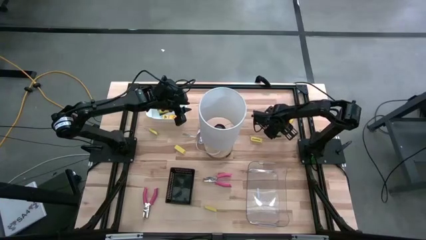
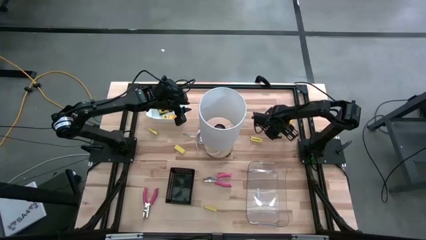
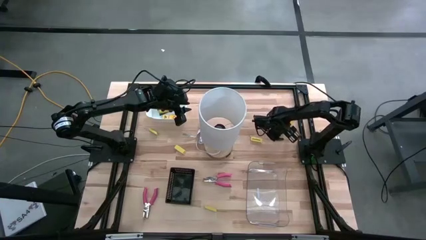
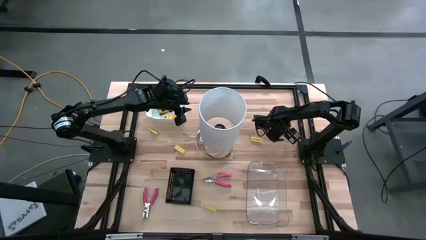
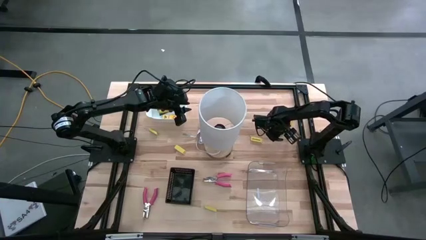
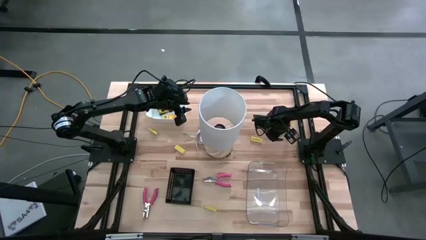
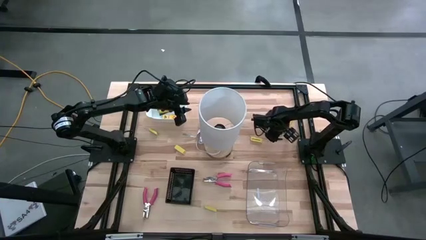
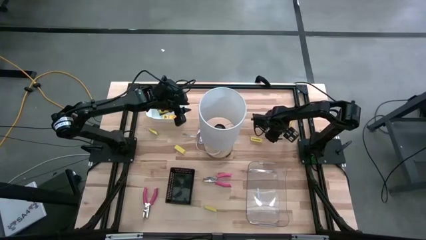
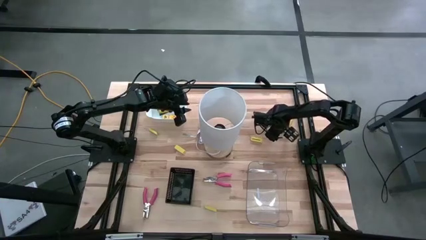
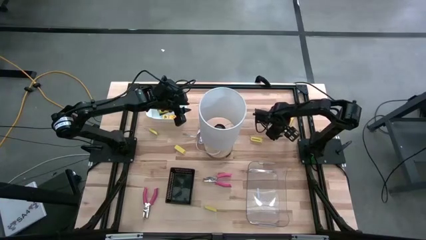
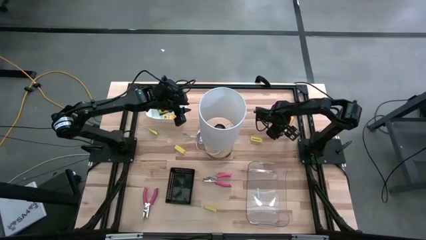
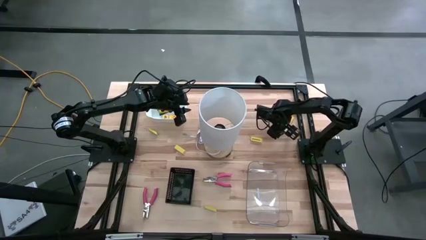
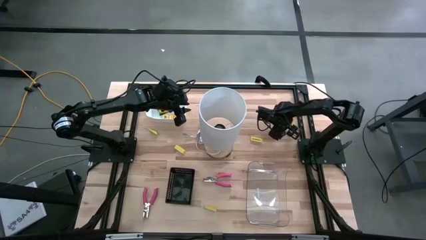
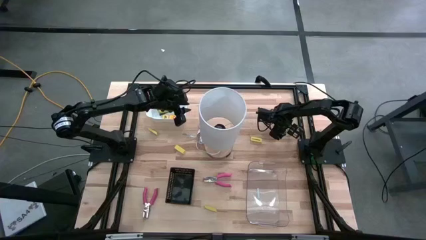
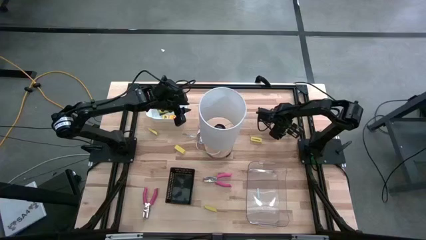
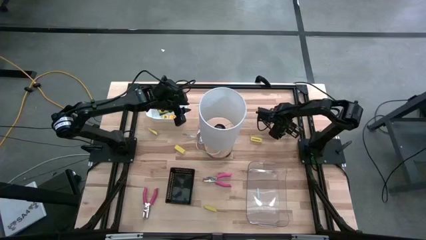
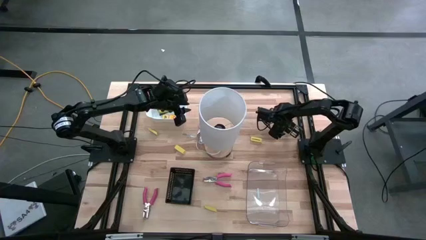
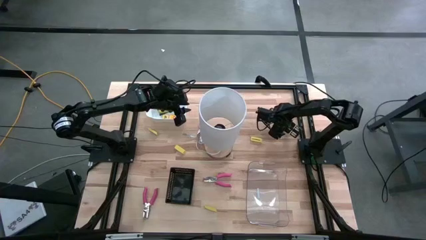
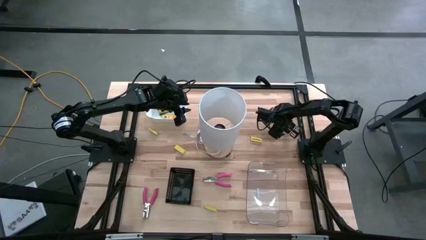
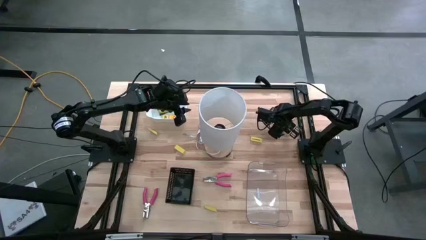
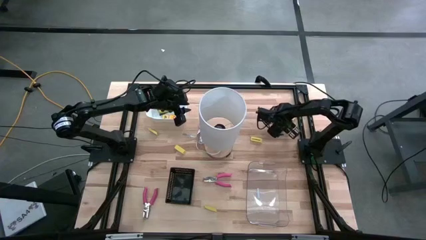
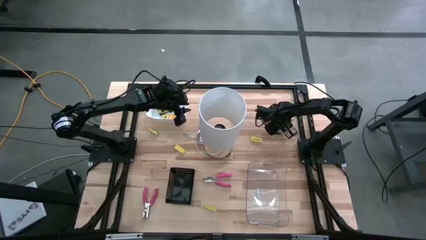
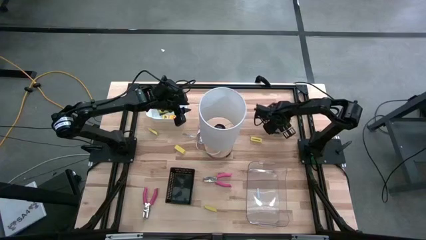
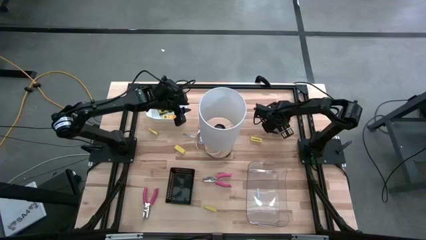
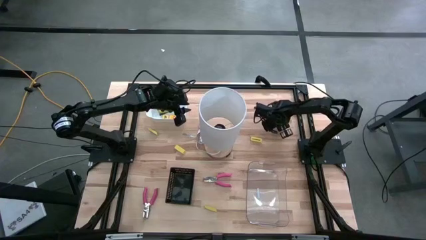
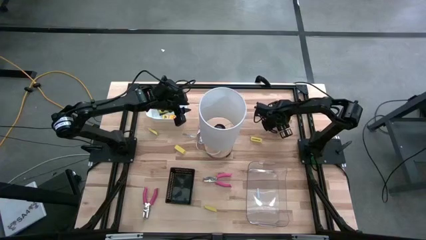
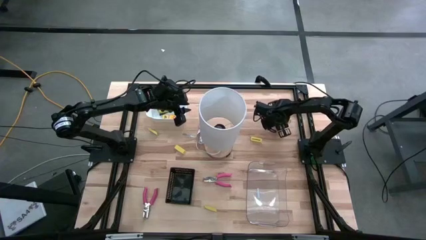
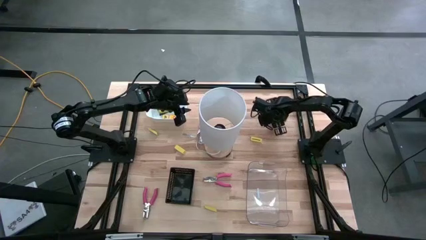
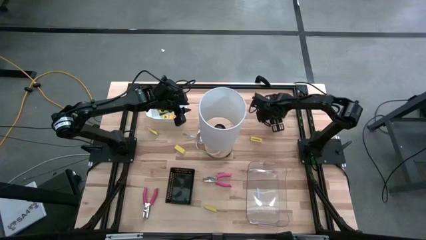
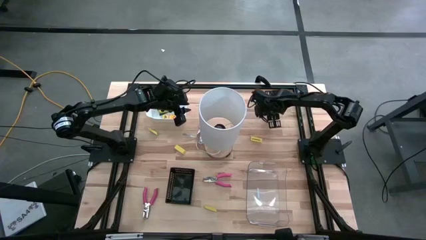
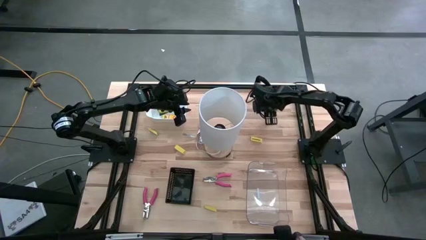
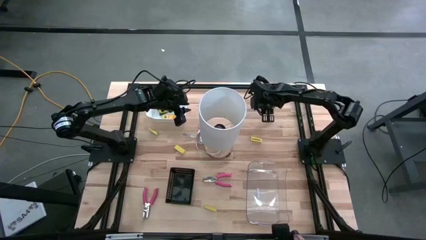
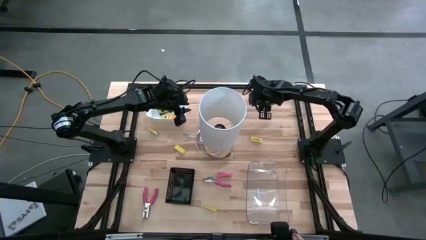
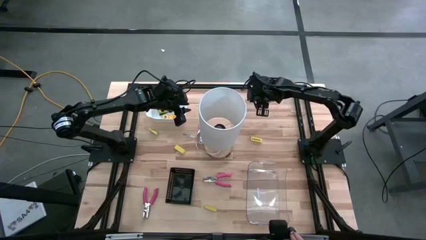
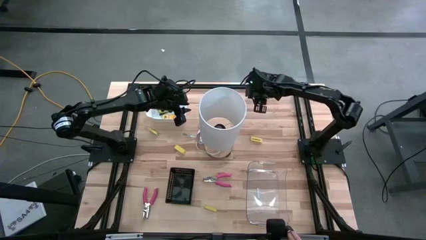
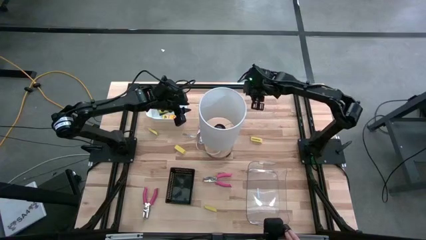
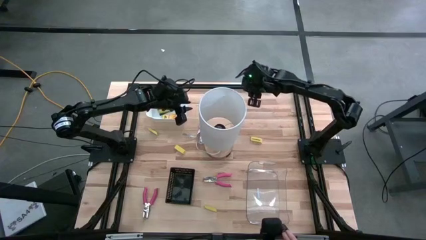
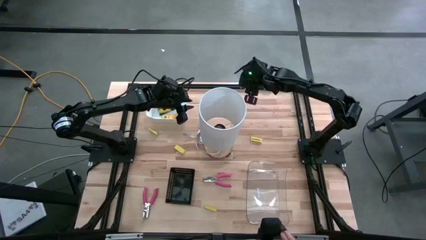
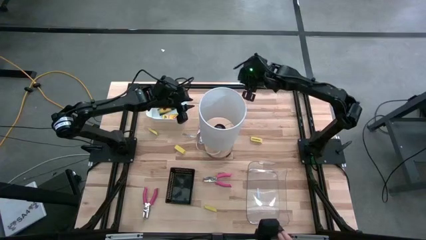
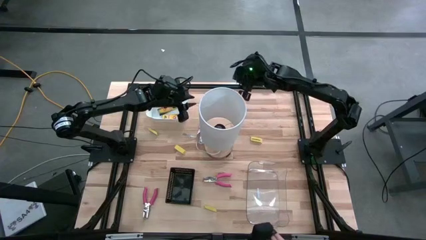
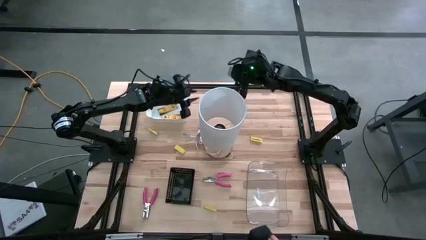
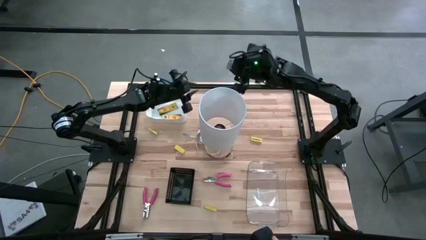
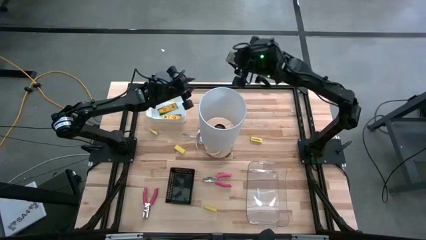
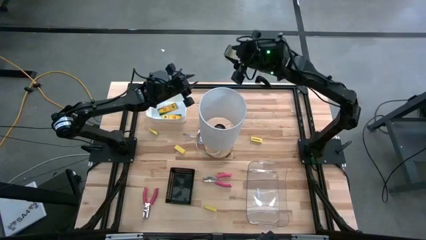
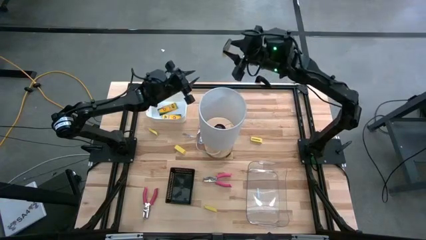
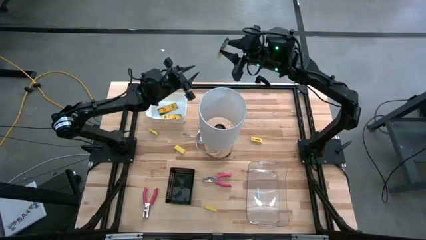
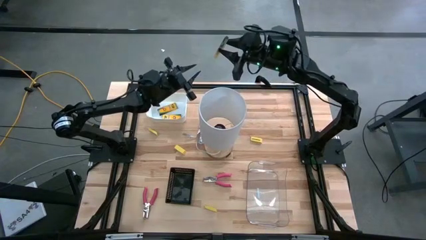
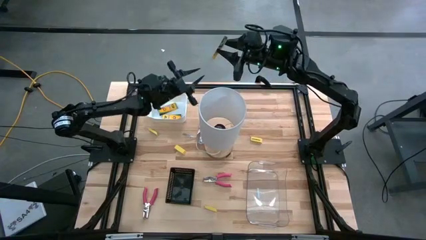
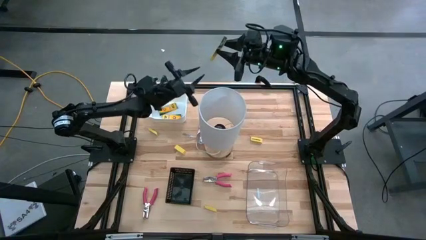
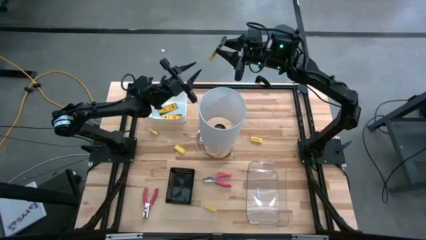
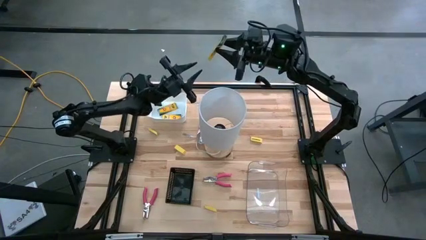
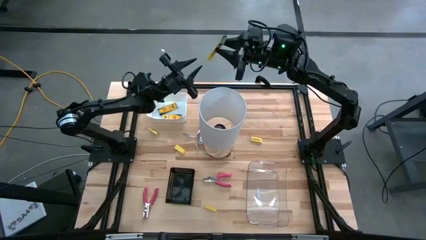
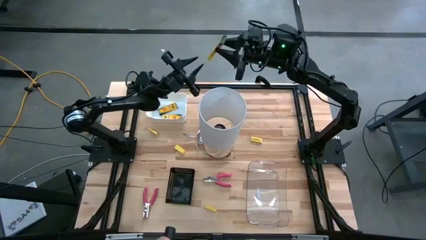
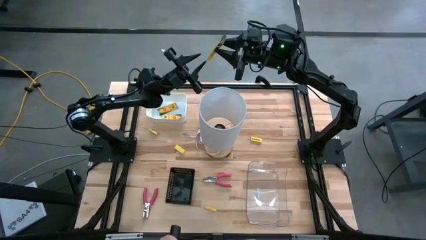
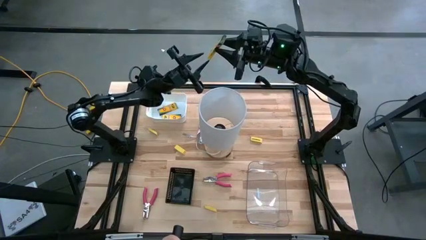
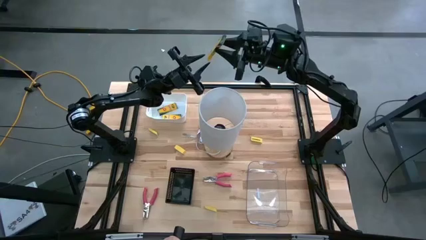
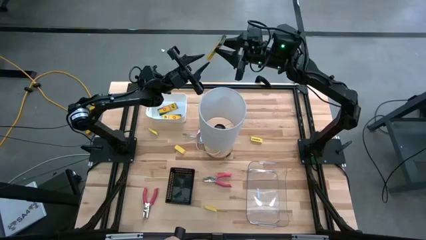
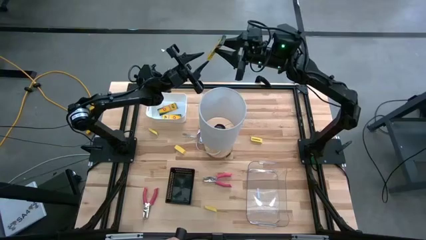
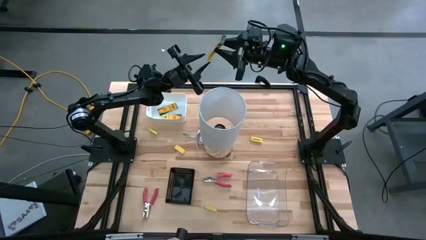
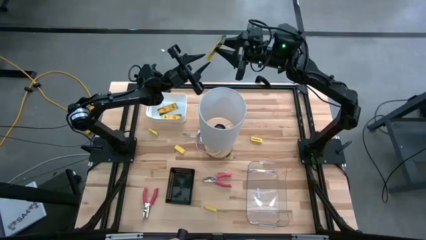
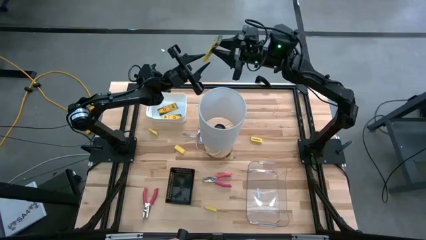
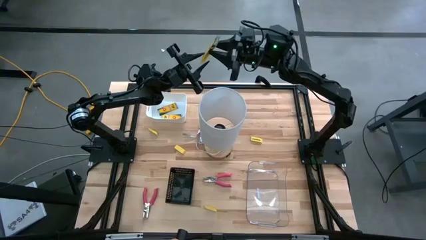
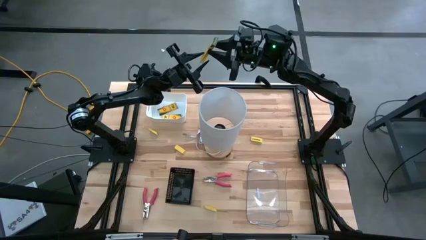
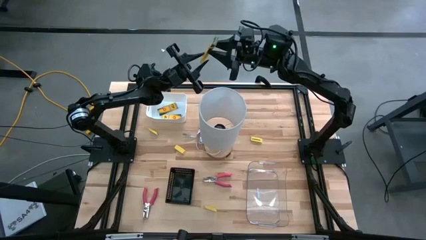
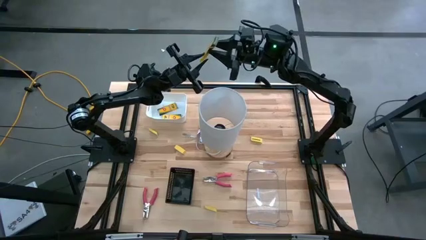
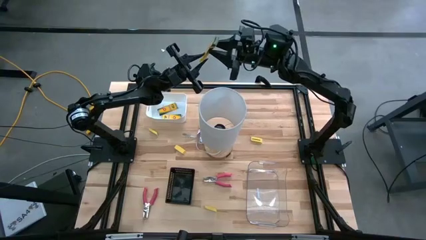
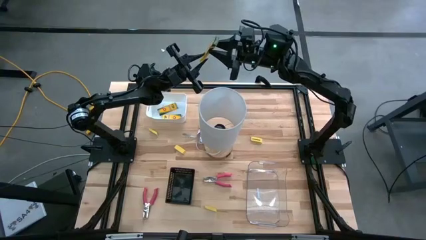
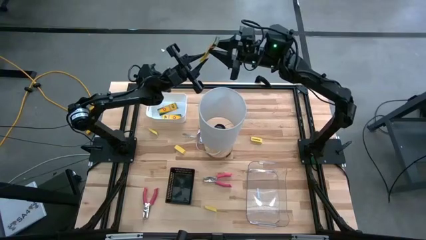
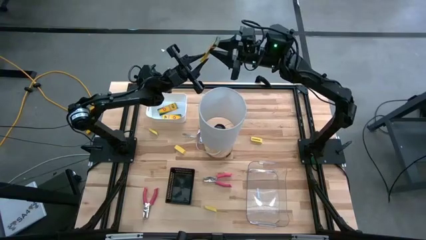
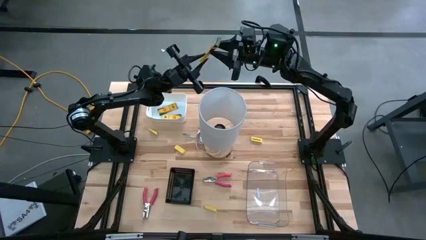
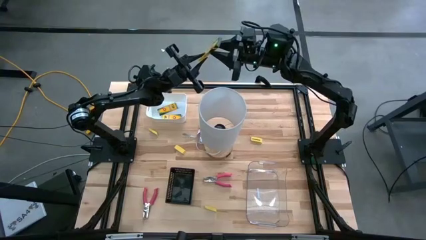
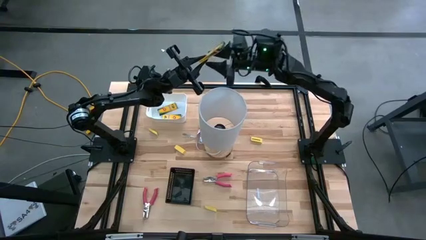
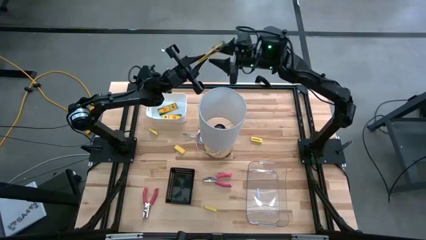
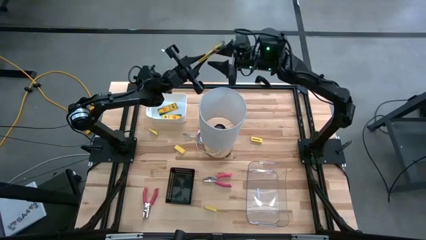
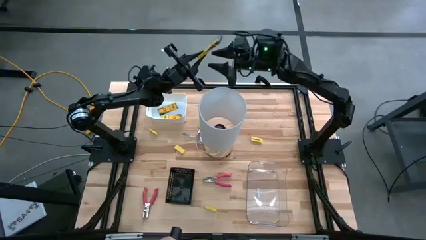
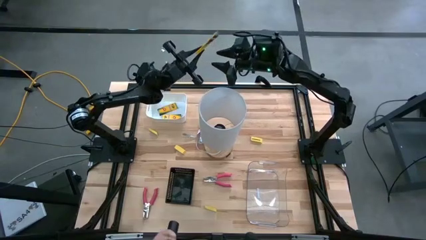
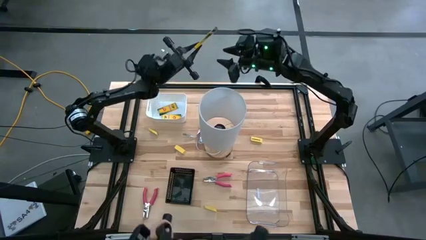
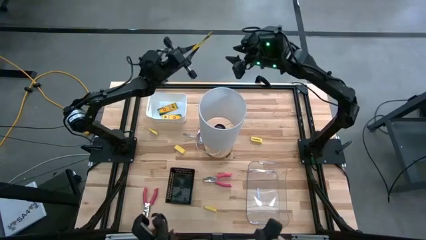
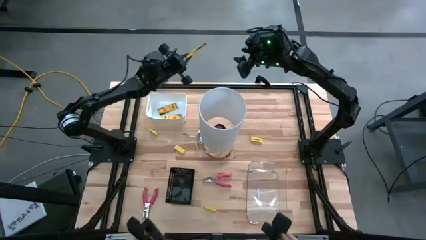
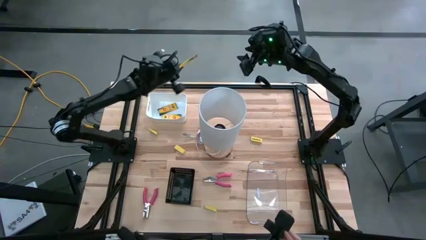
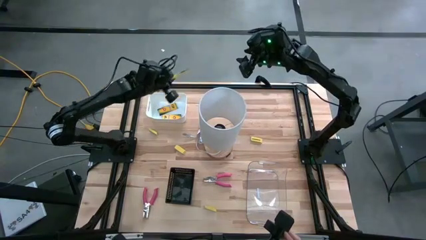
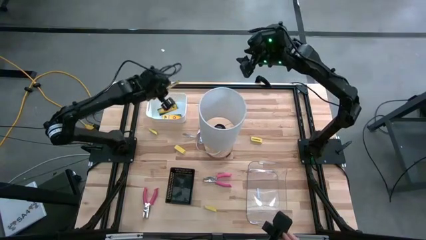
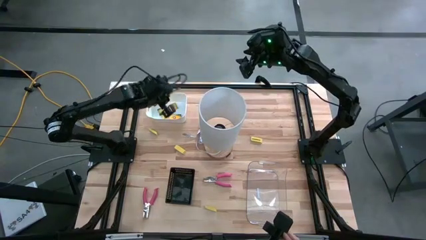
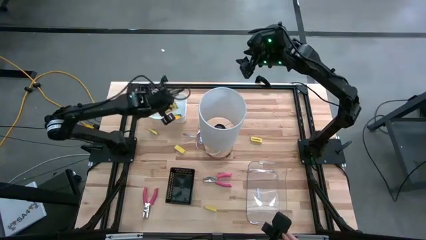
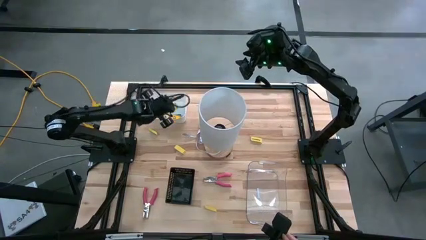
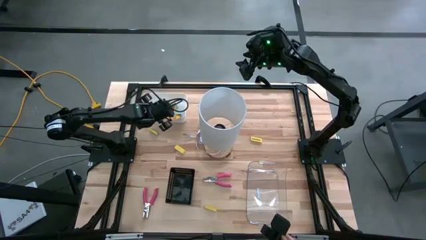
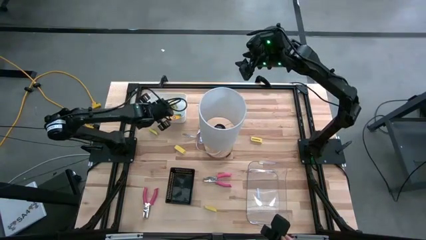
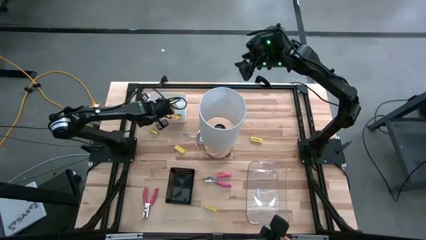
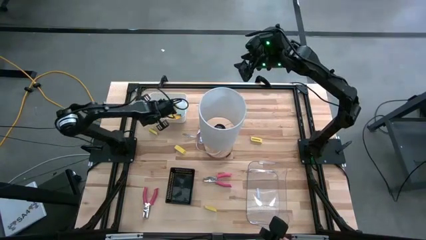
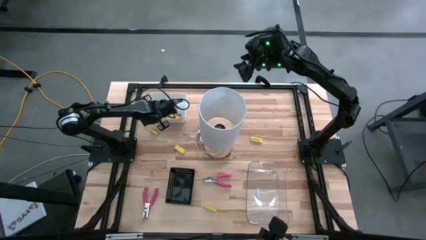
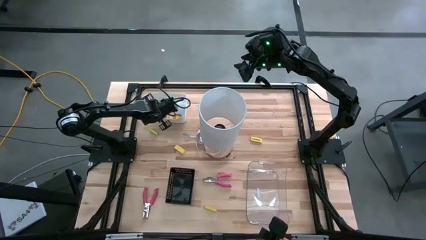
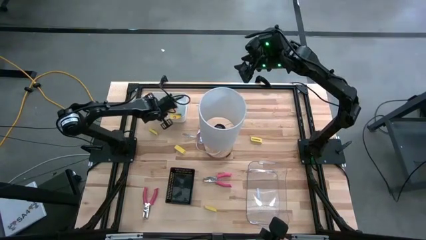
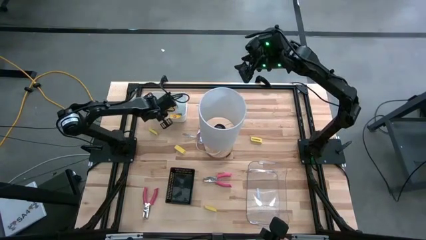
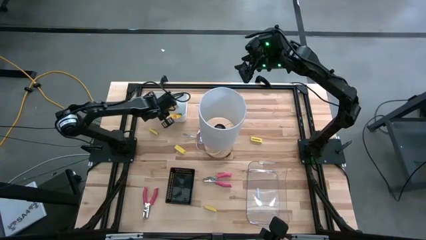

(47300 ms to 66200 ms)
Task: Pick & Place School Supplies
Put the crayon box into the white bin
